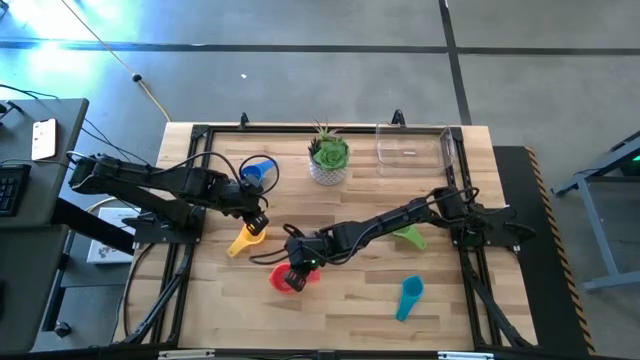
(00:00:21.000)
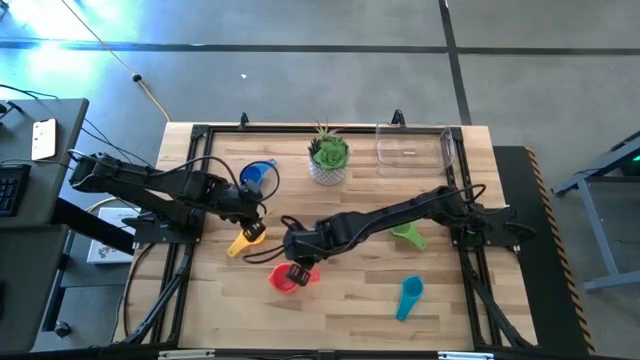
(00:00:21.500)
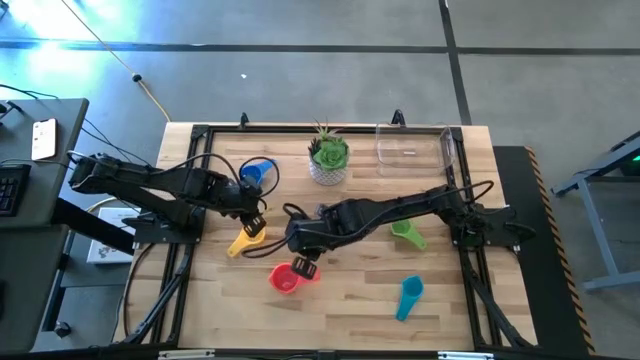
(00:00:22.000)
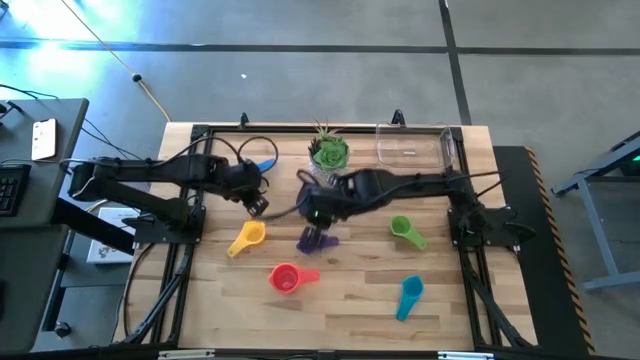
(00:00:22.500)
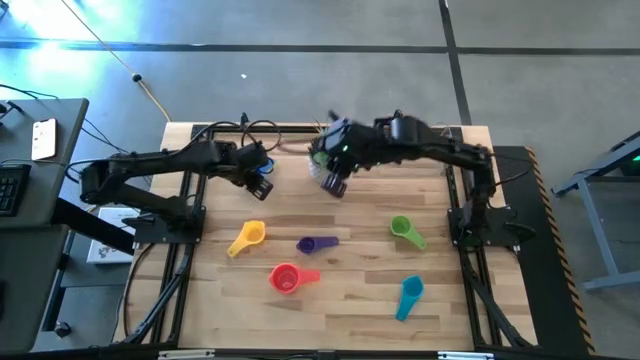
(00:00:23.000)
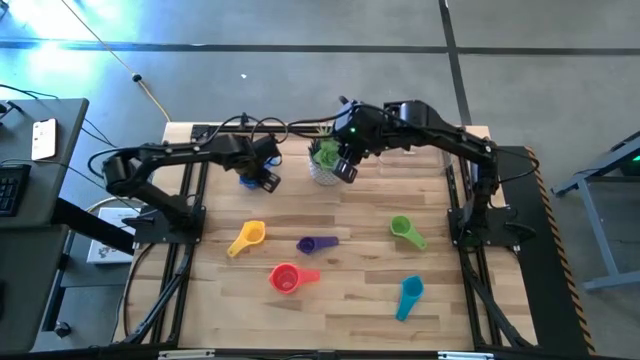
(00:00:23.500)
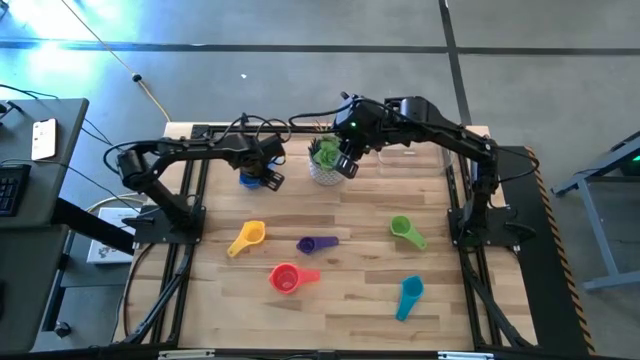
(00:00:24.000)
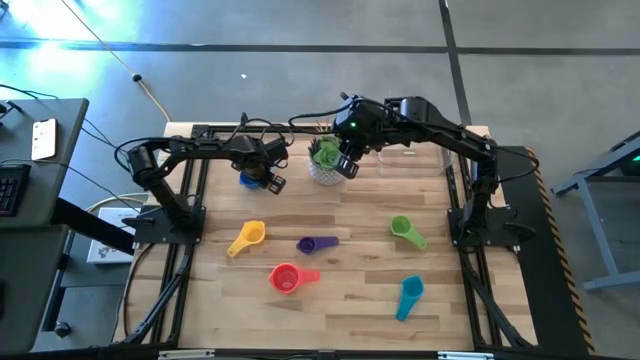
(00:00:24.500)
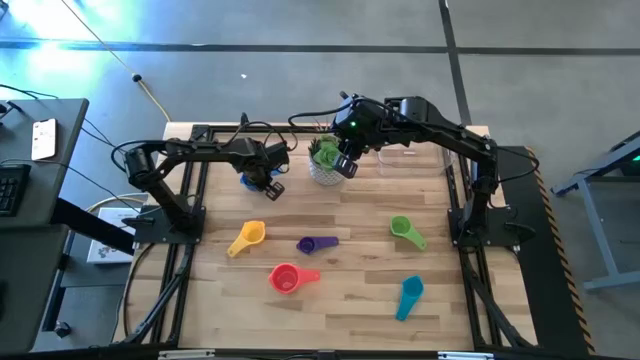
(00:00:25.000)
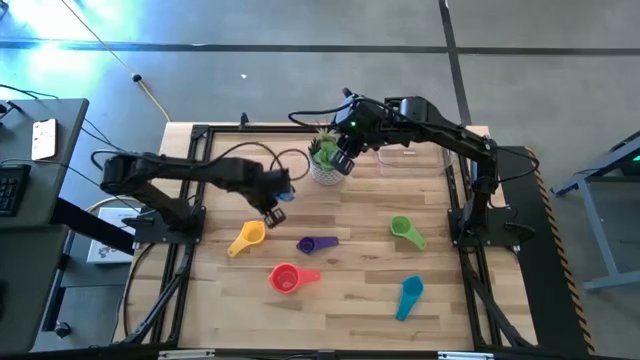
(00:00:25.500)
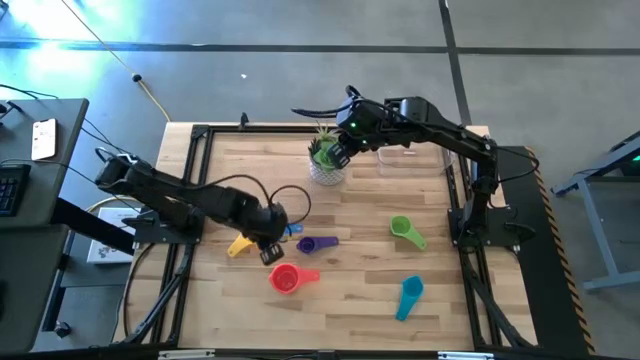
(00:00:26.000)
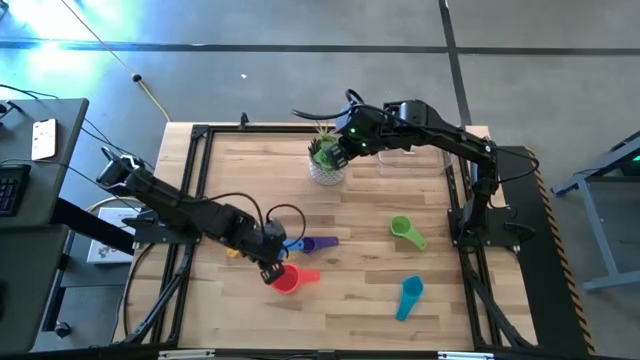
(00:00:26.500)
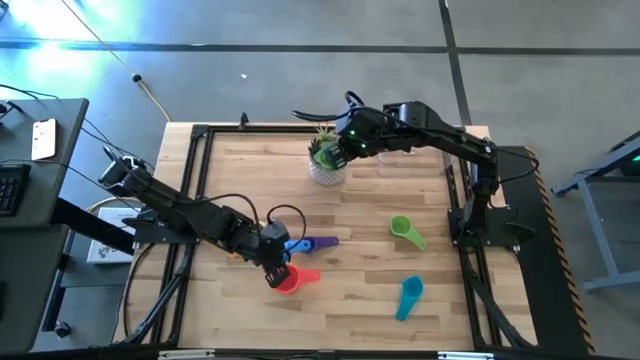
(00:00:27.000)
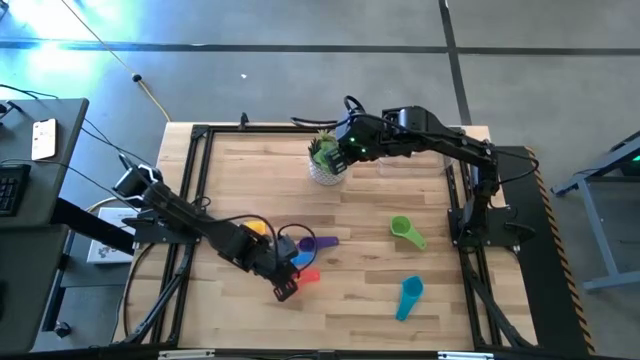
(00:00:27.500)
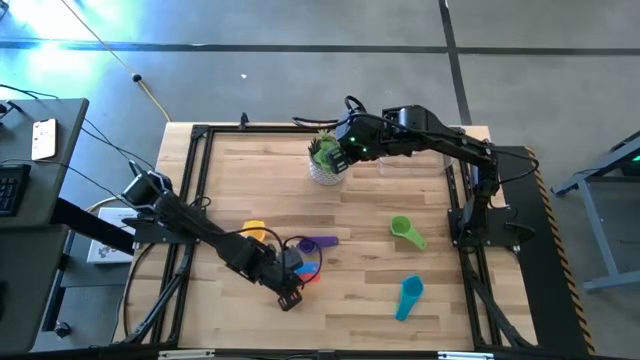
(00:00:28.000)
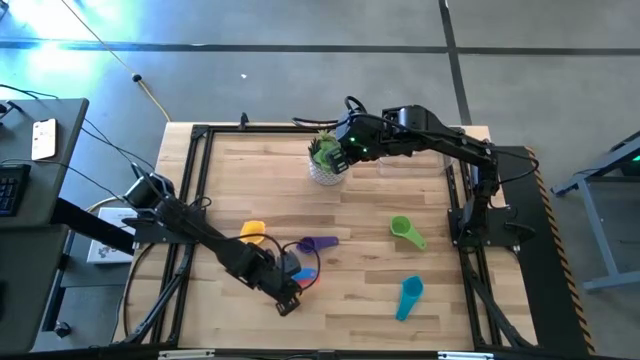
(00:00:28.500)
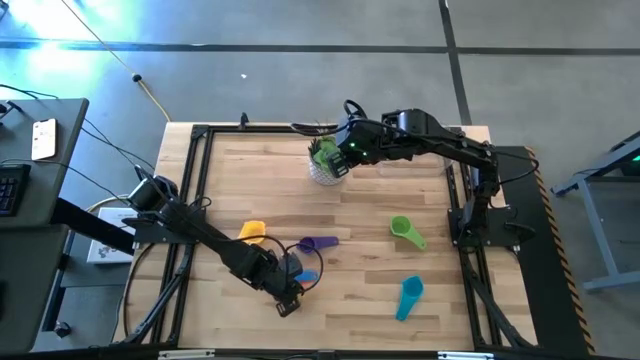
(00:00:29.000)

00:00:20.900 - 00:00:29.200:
Task: Nest measuring cups in basket
Stack the blue measuring cup on top of the red measuring cup

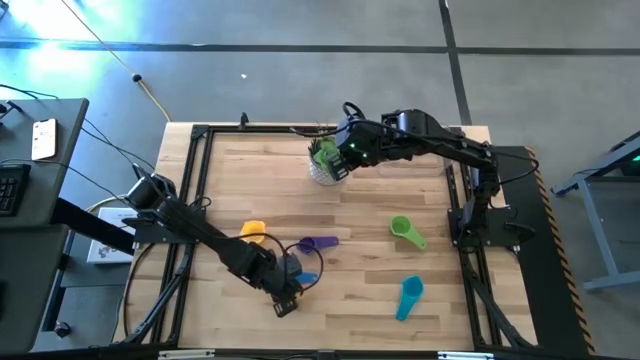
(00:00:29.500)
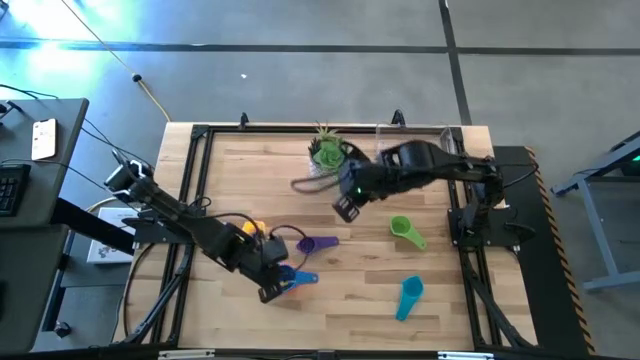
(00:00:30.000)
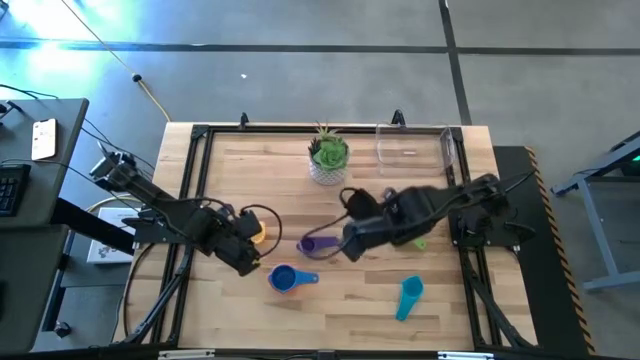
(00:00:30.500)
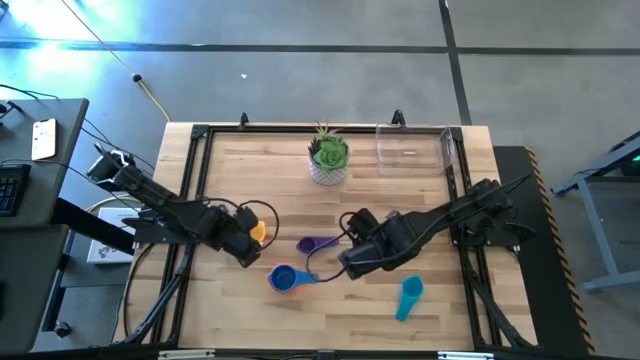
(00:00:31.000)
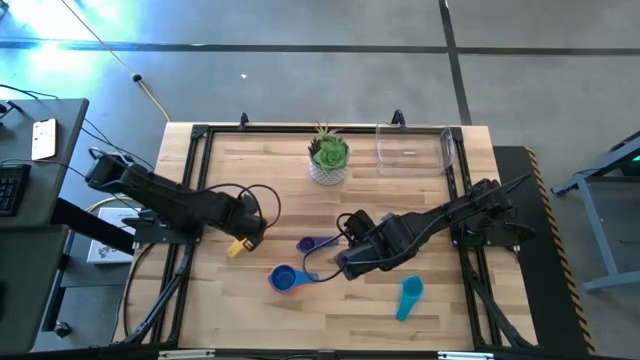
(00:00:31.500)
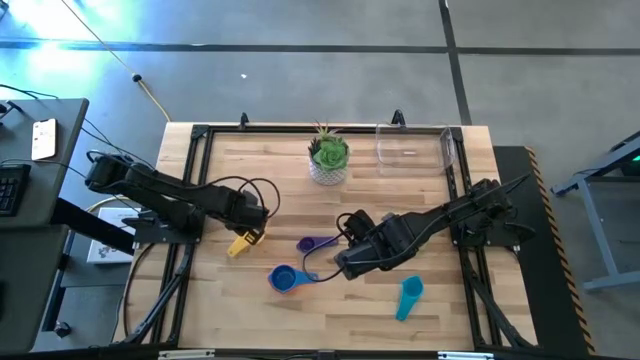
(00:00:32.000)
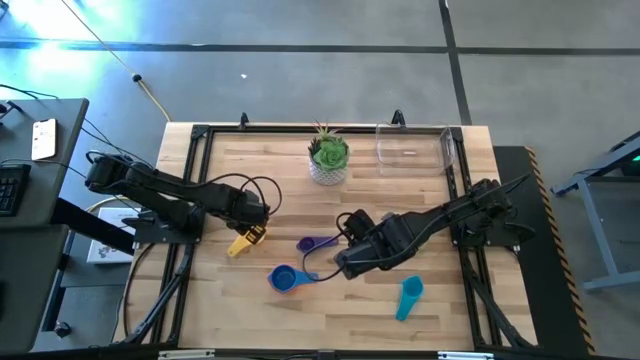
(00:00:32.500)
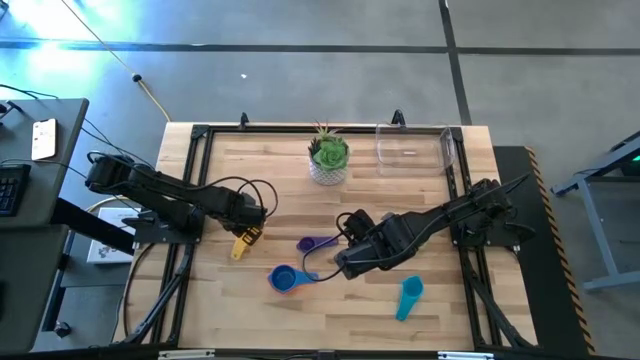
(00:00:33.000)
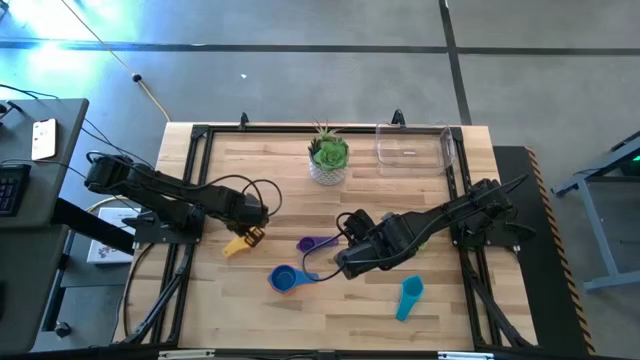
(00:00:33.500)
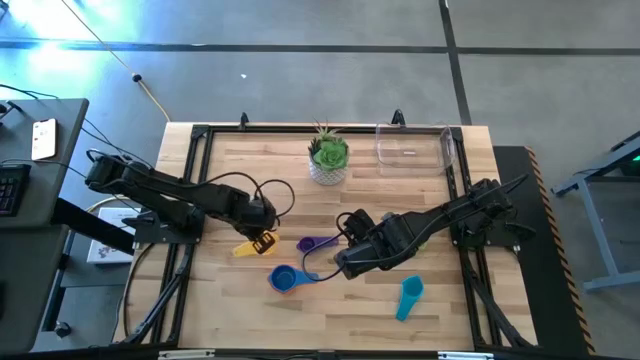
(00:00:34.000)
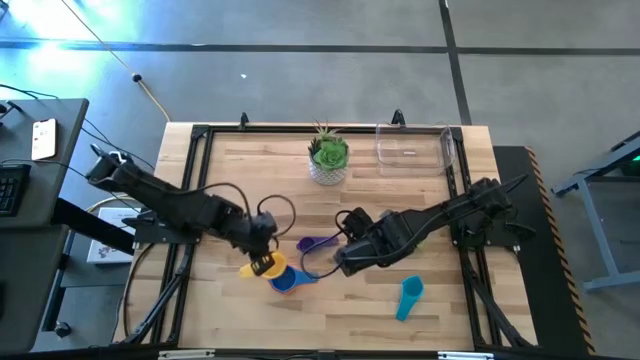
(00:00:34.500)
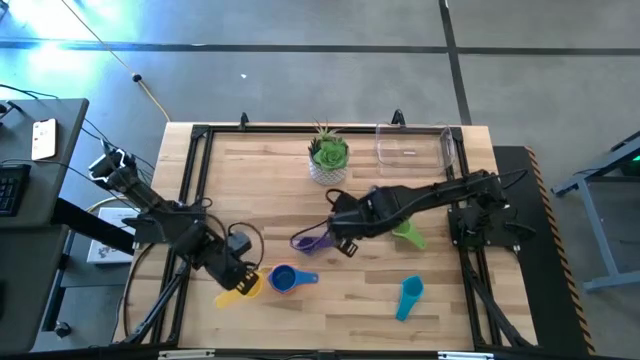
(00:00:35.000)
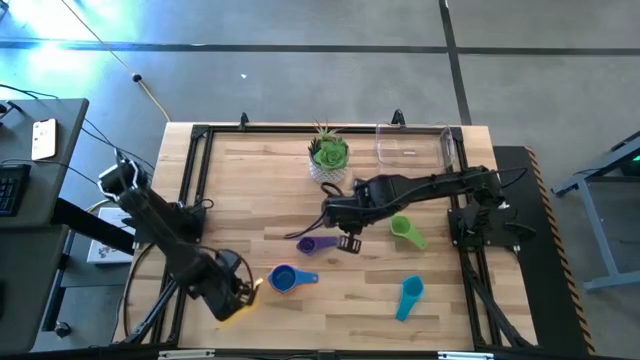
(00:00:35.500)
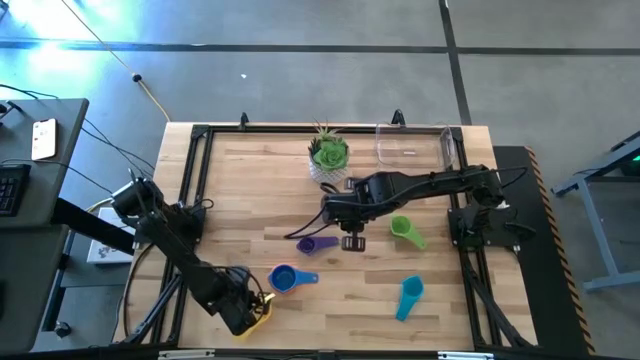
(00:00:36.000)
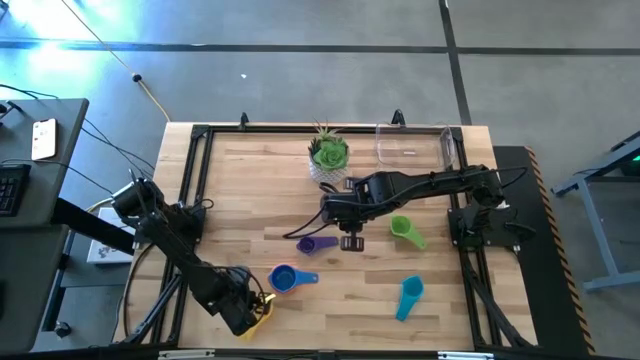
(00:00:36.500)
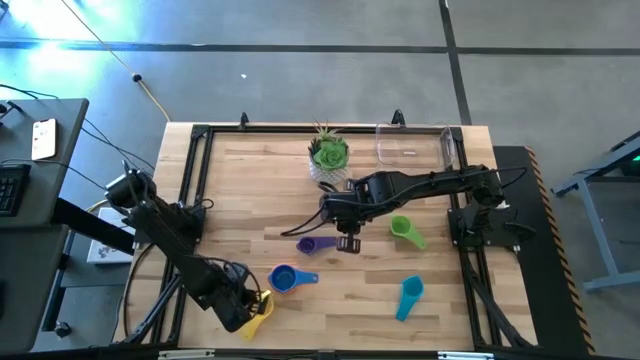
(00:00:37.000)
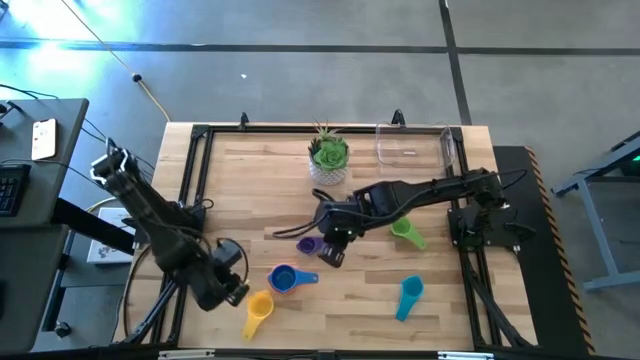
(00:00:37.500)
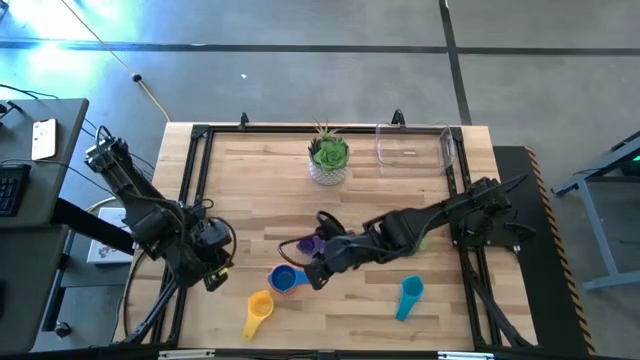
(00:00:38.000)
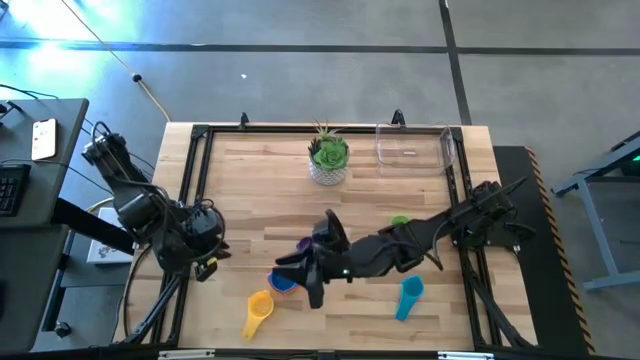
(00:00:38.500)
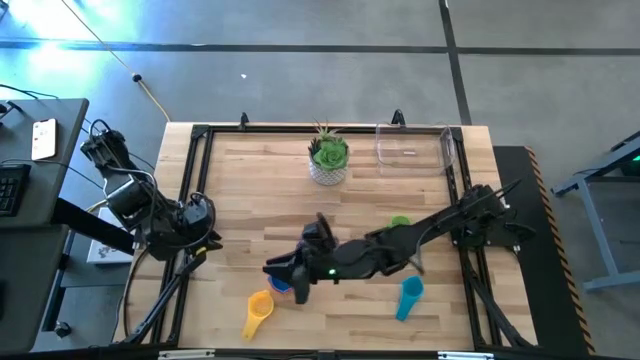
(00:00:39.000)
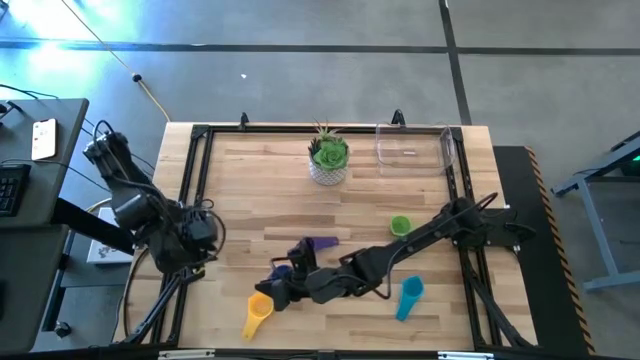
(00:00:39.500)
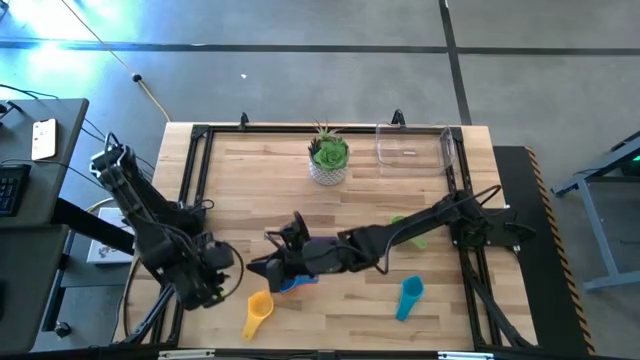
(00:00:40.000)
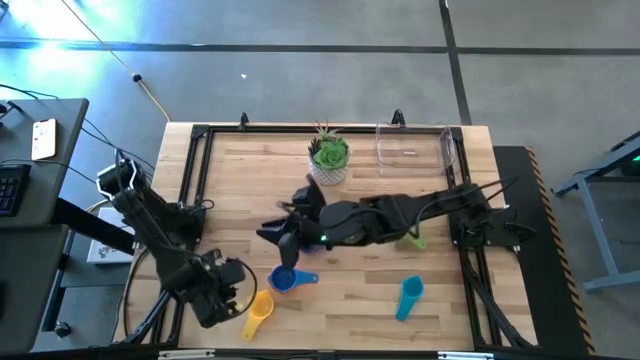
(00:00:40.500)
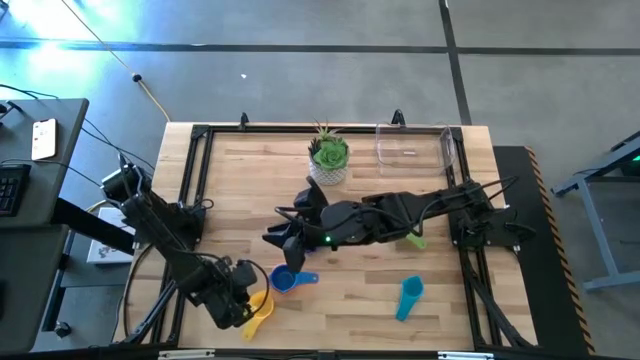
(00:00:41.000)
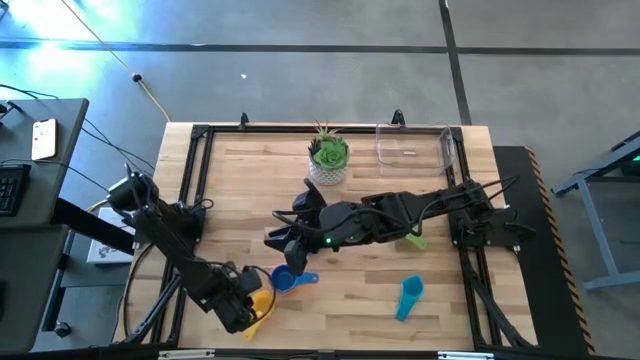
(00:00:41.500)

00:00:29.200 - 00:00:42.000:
Stack the yellow measuring cup on top of the blue measuring cup
